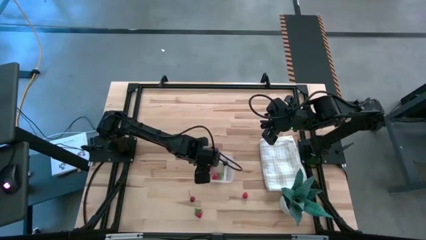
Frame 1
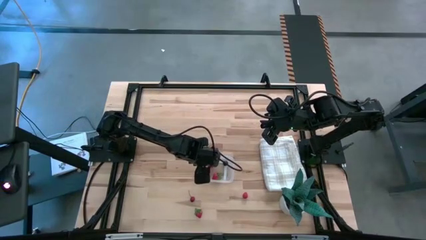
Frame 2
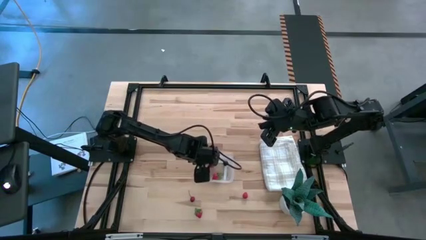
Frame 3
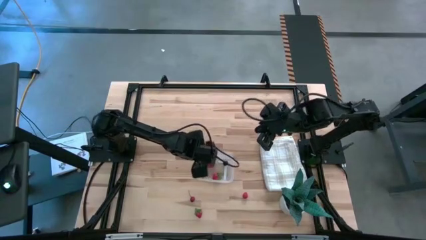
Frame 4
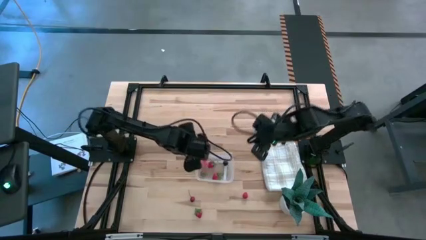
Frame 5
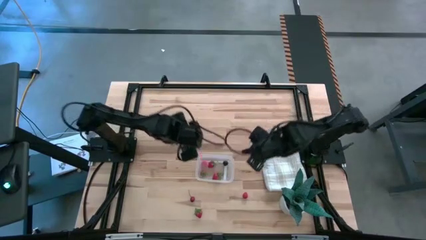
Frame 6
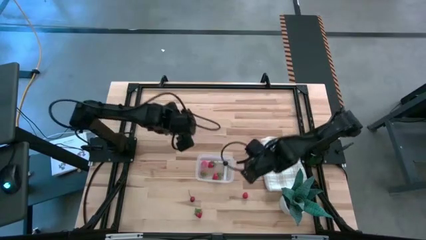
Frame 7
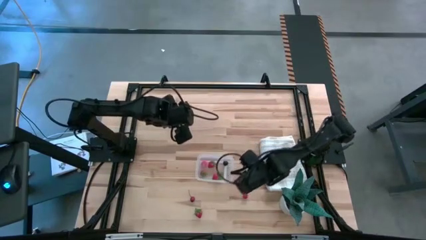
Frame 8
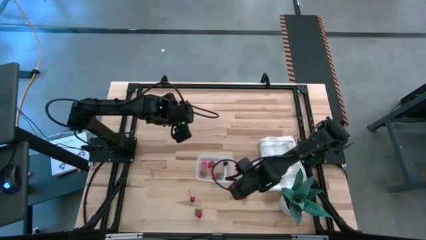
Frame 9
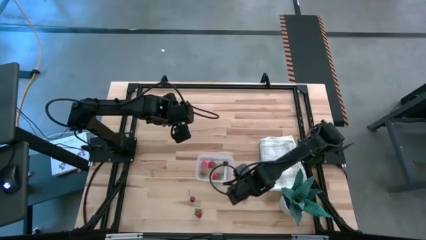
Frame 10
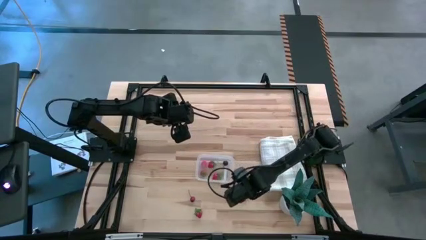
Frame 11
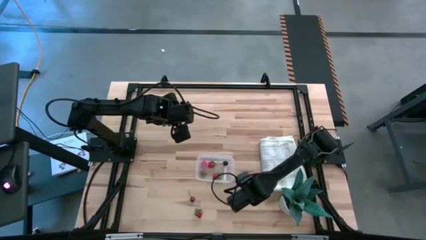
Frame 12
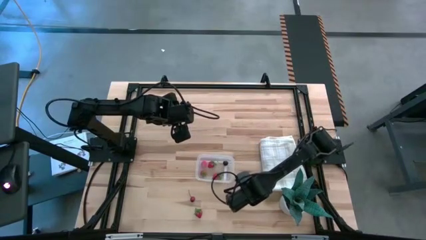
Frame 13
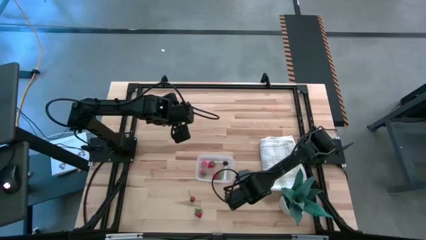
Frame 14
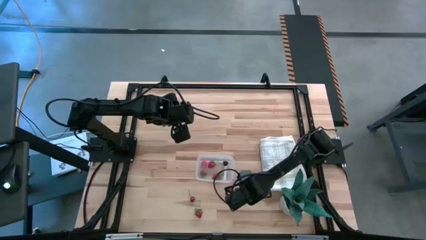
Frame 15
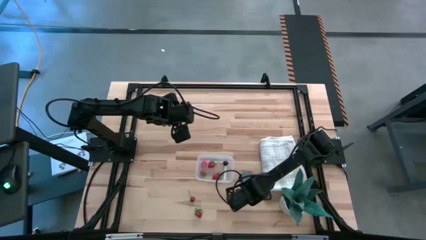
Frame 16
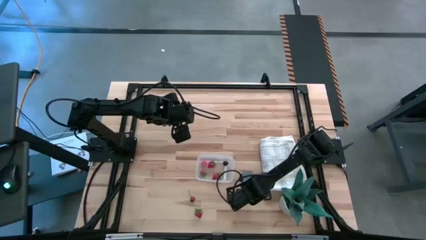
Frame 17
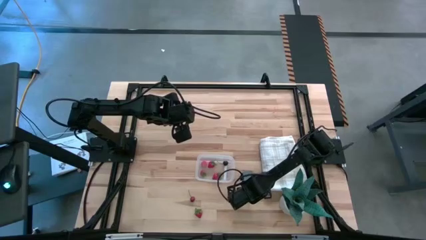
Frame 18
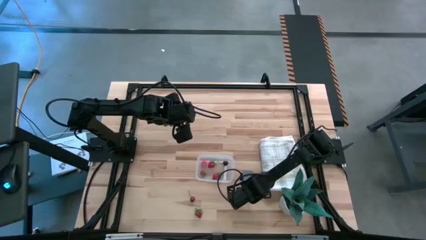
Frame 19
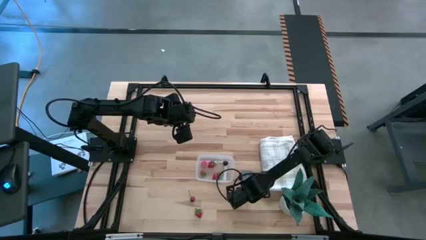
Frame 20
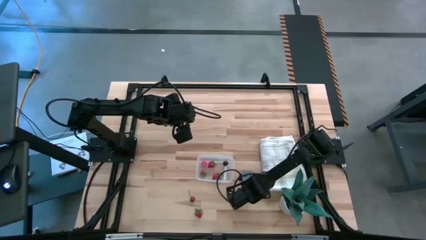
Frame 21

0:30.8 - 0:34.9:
Task: Pick and placing Produce into tupperware
Put the raspberry into the bin

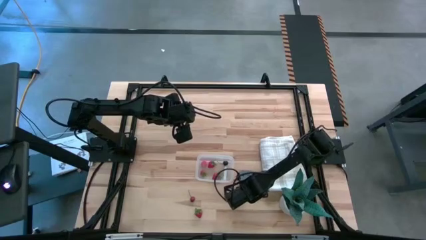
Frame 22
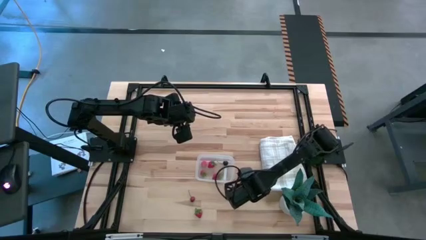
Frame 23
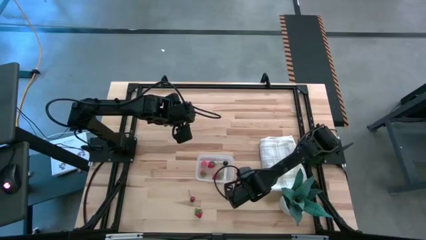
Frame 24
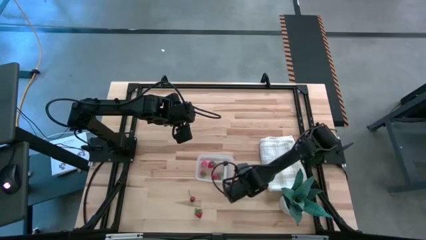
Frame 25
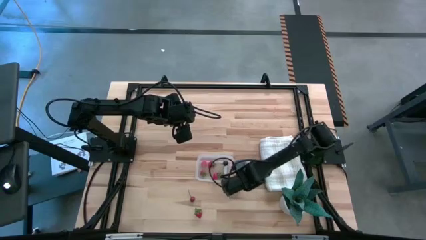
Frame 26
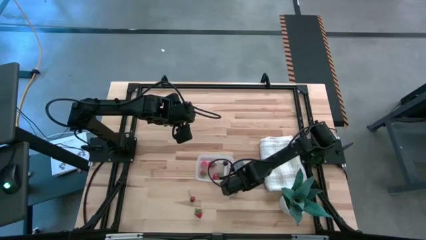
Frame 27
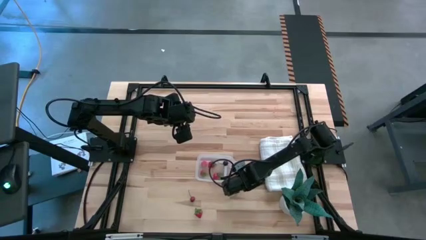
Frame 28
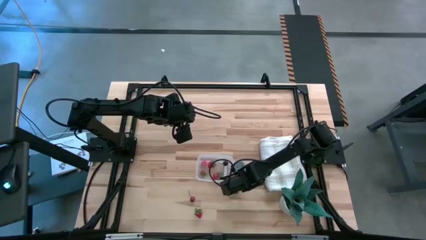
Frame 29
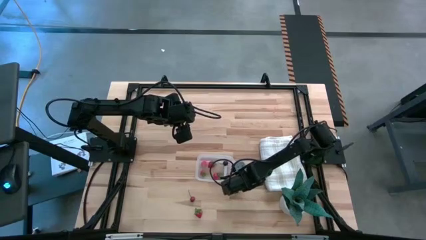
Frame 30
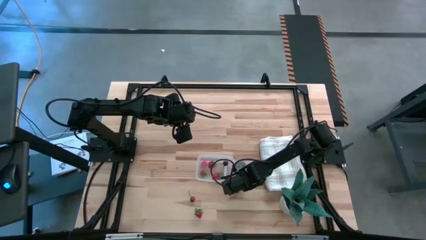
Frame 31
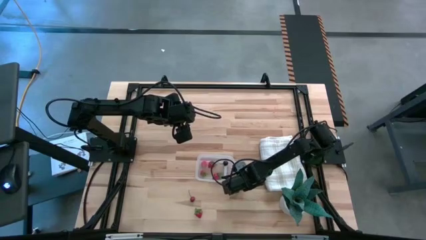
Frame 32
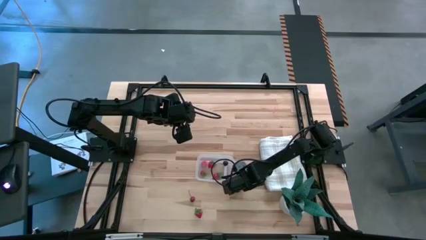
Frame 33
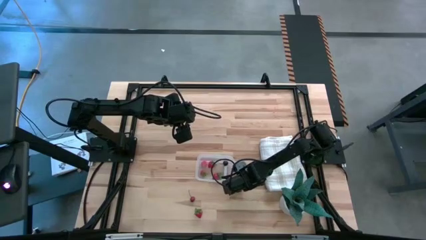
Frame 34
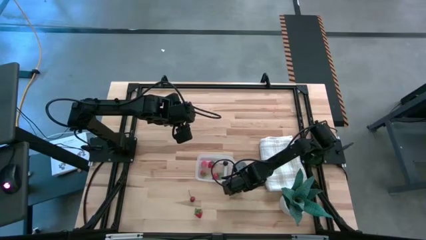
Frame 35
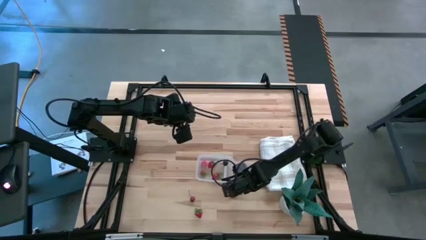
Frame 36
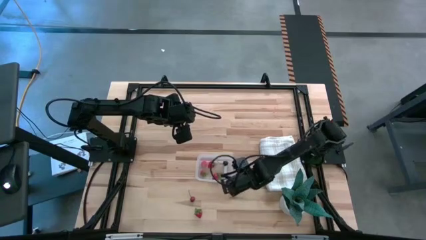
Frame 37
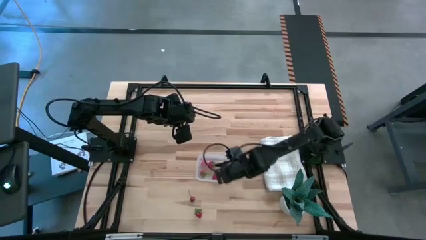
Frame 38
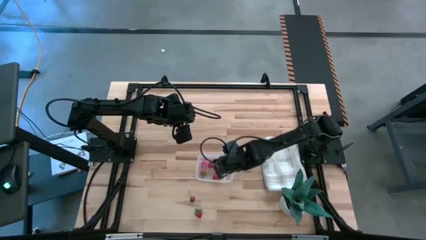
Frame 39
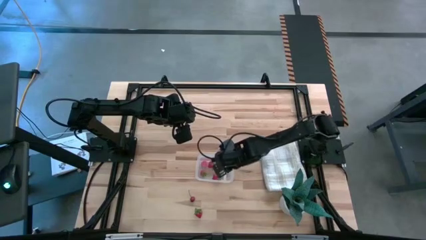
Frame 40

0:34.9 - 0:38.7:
Put the raspberry into the bin

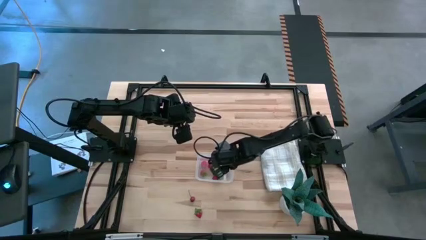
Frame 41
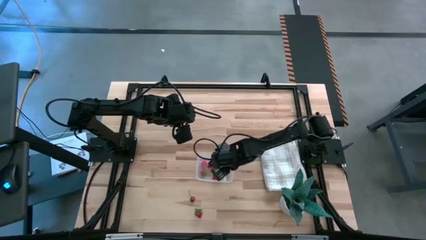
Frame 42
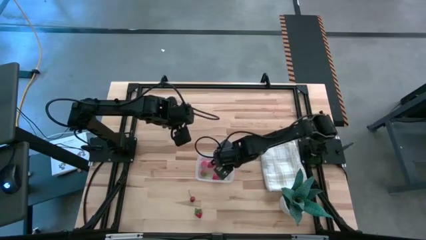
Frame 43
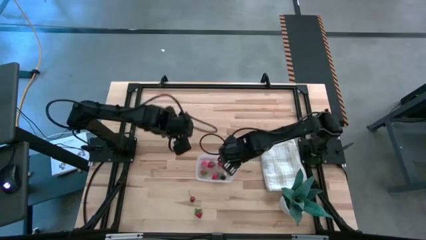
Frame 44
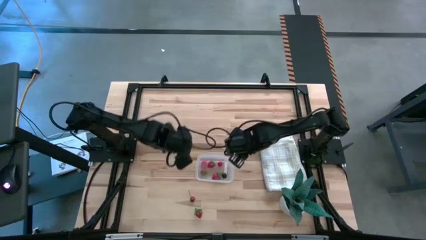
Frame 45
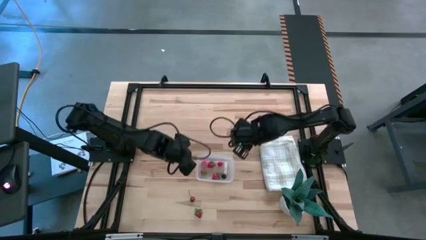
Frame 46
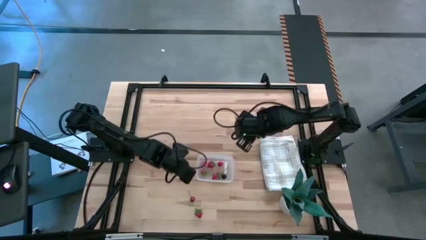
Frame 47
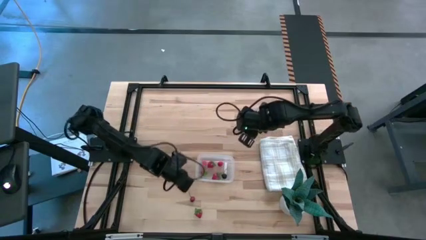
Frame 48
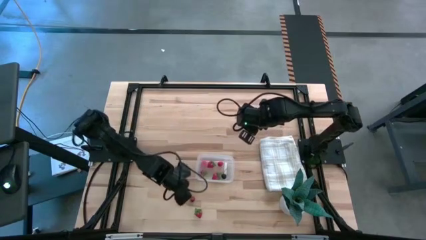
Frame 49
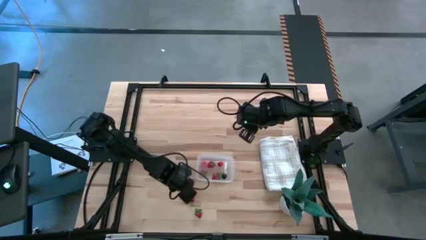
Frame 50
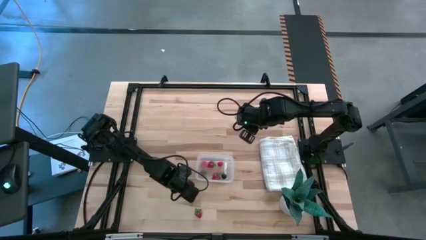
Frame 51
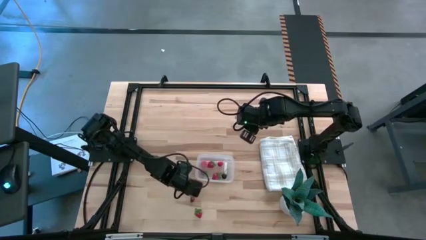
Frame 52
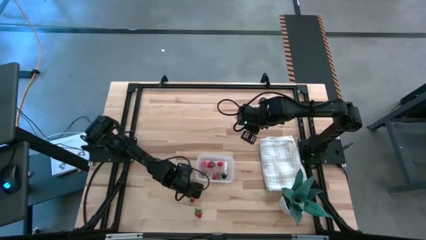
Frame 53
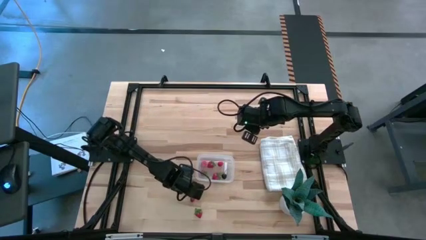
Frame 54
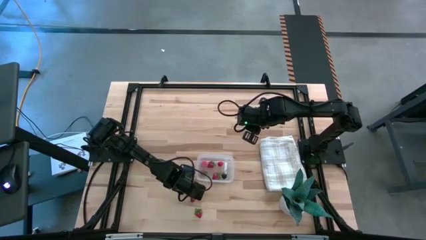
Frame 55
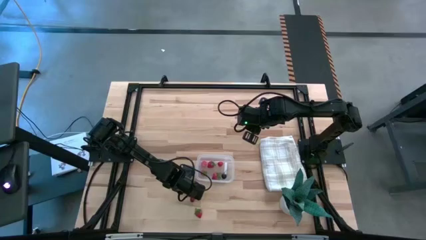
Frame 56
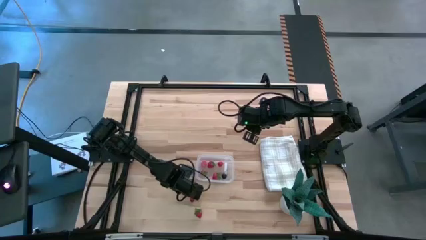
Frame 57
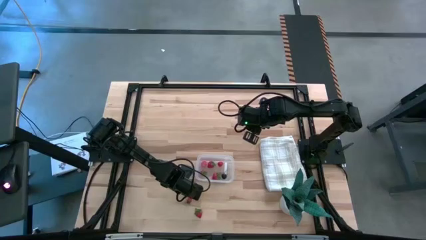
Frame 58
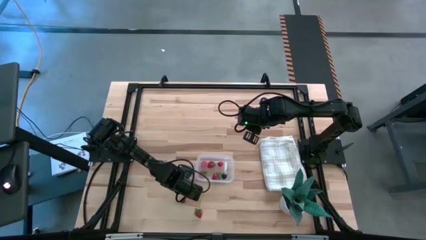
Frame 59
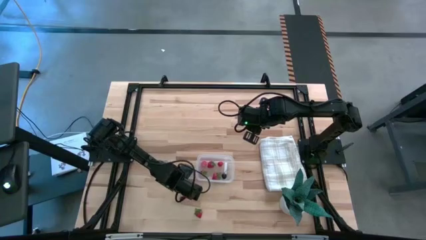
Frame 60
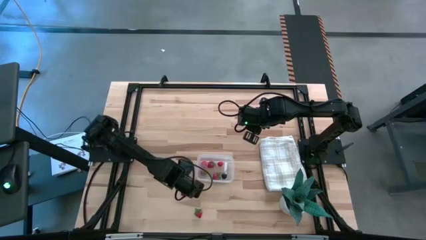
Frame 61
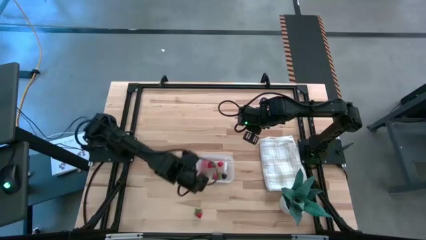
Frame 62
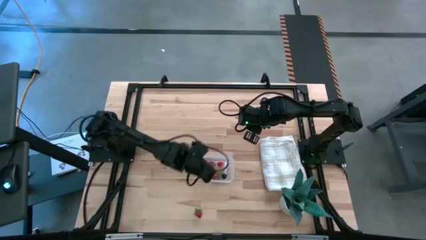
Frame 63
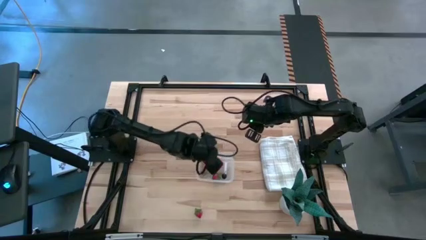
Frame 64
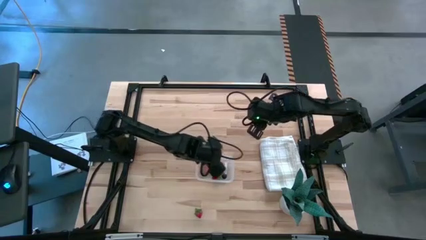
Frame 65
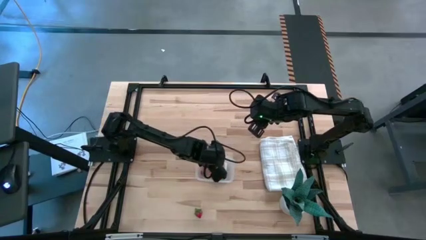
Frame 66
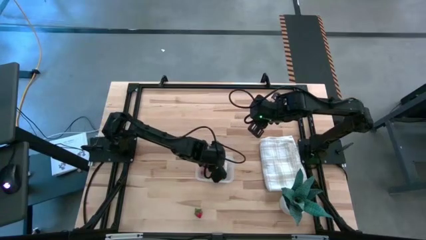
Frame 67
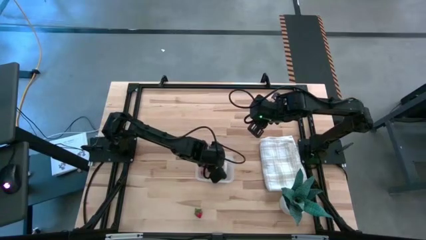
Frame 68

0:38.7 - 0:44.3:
Put the cherry into the bin

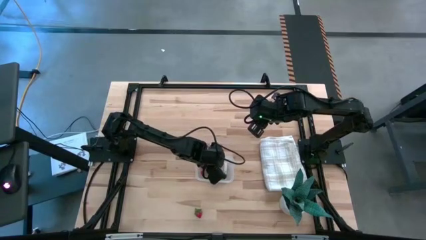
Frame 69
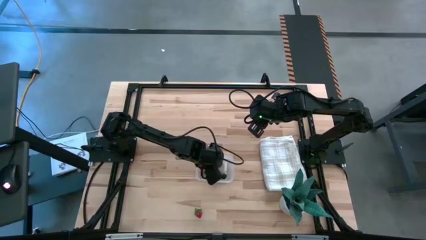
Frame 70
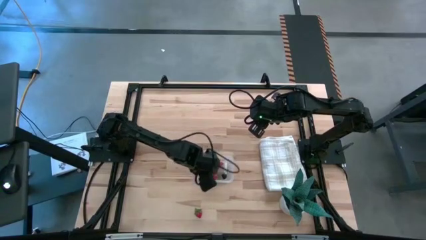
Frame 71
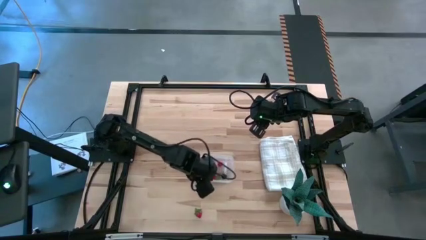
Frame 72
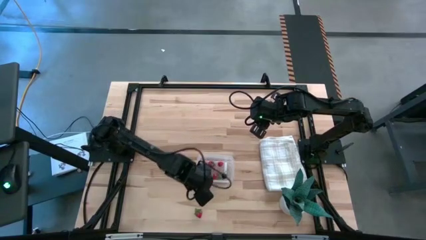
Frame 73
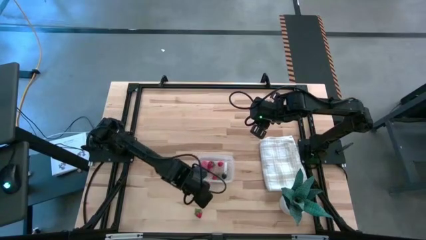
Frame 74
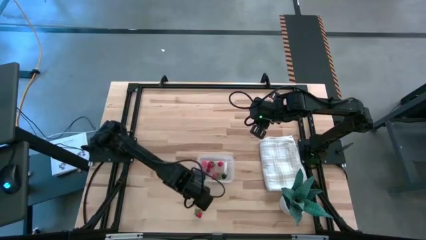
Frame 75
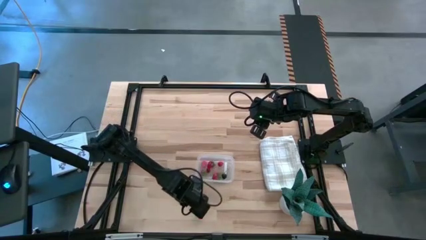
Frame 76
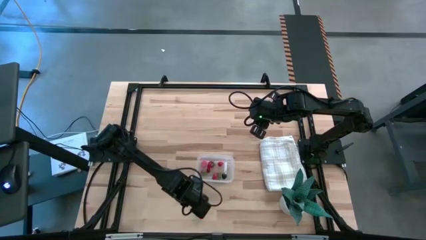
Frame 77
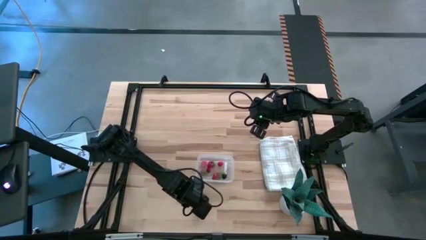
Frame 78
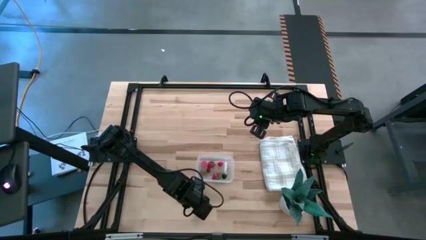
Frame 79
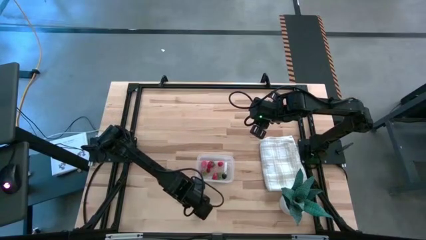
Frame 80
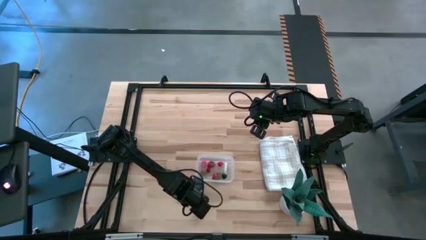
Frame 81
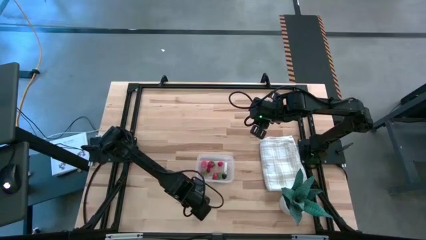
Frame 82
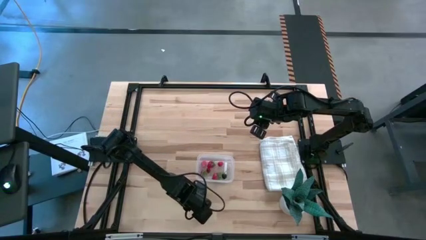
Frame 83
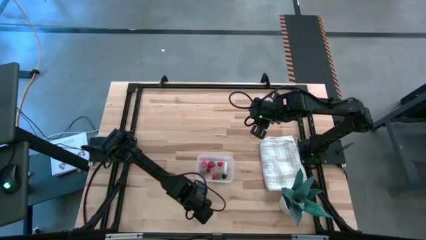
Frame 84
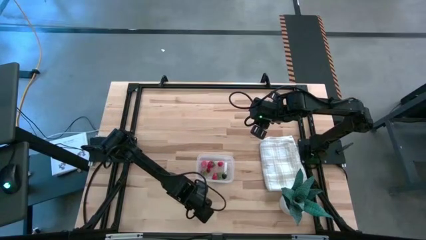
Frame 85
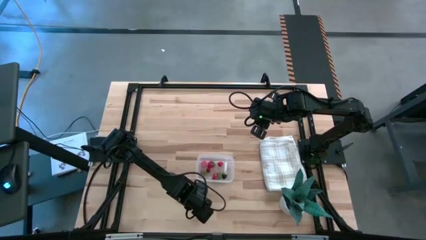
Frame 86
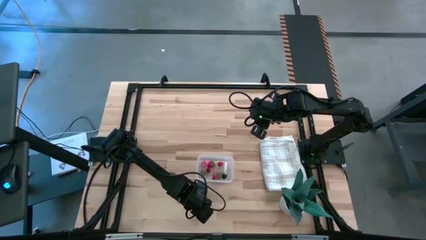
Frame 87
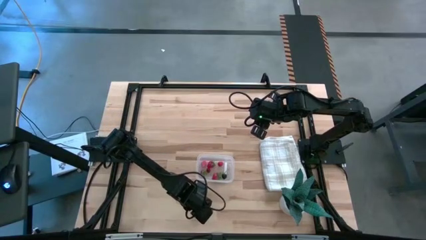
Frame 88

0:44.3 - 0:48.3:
Put the strawberry into the bin
